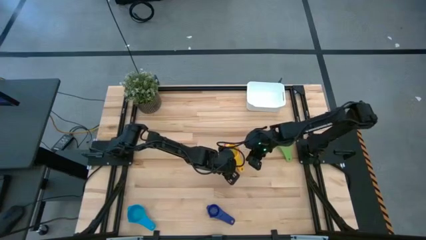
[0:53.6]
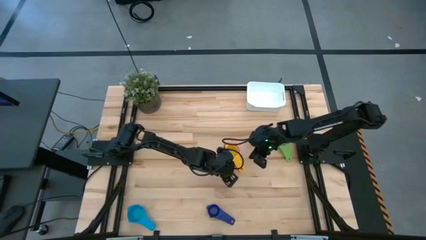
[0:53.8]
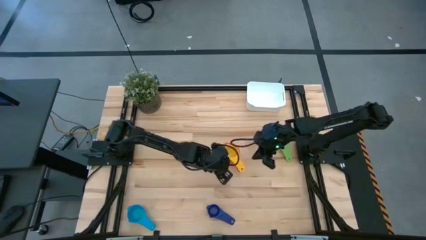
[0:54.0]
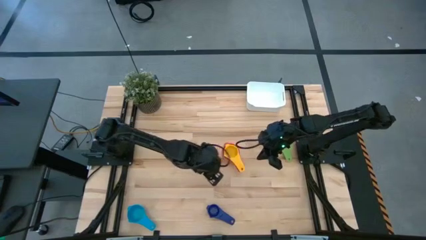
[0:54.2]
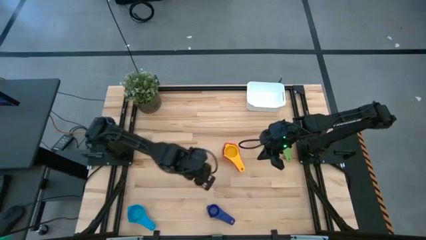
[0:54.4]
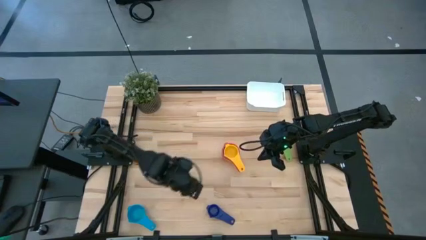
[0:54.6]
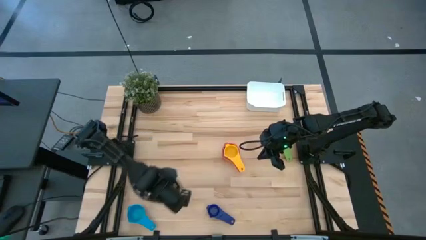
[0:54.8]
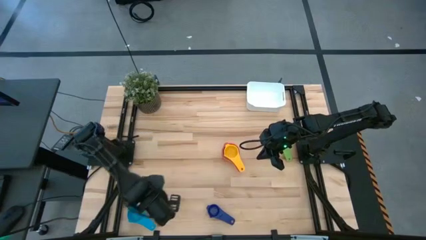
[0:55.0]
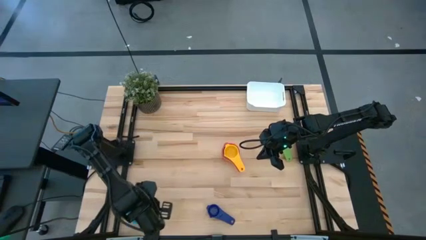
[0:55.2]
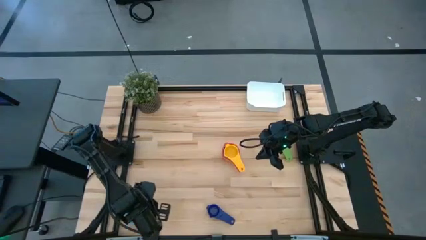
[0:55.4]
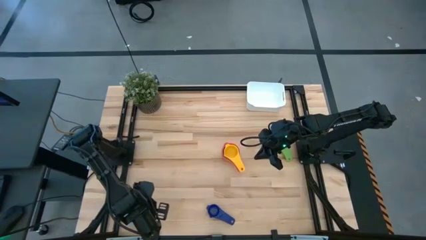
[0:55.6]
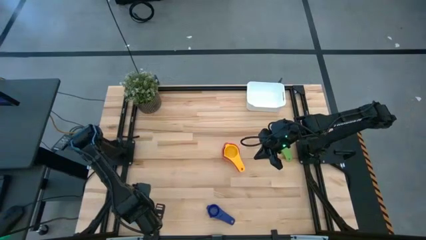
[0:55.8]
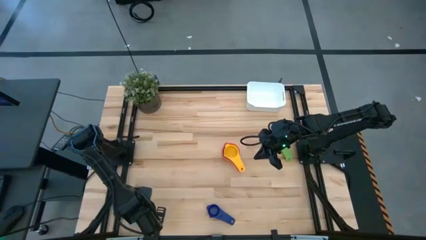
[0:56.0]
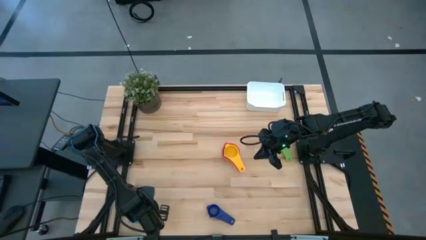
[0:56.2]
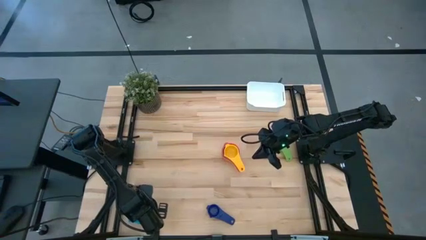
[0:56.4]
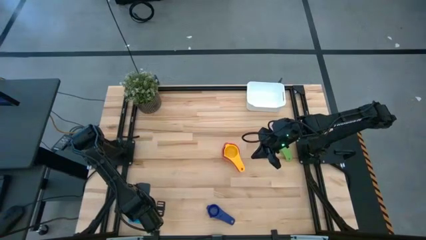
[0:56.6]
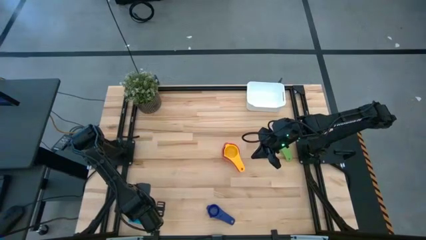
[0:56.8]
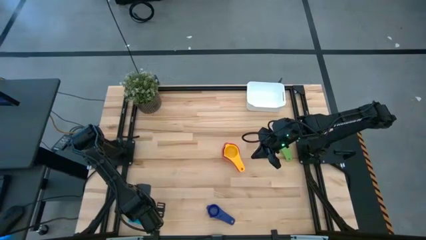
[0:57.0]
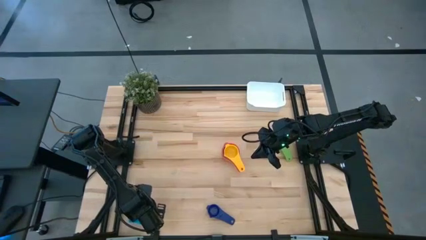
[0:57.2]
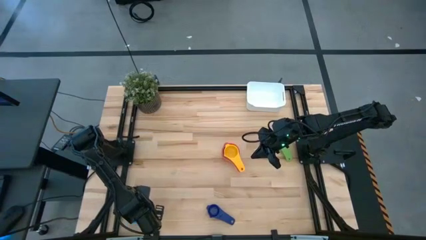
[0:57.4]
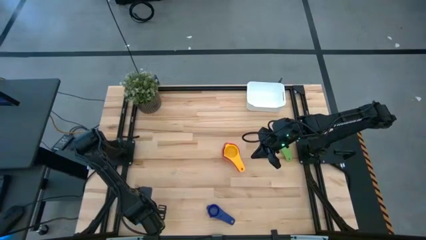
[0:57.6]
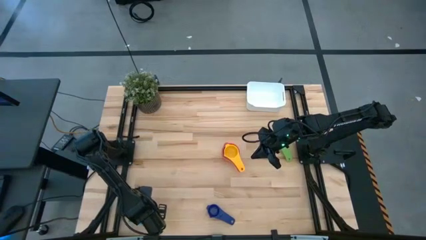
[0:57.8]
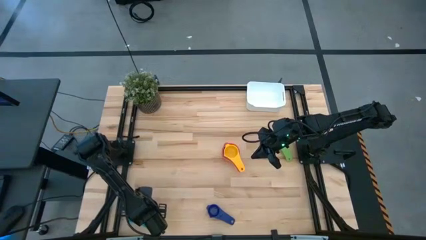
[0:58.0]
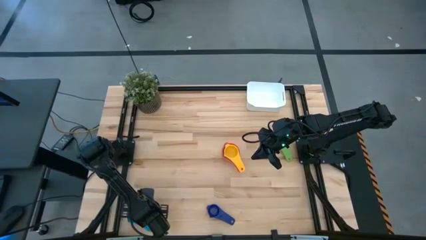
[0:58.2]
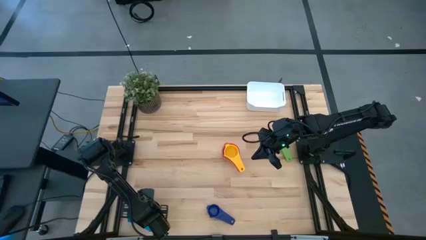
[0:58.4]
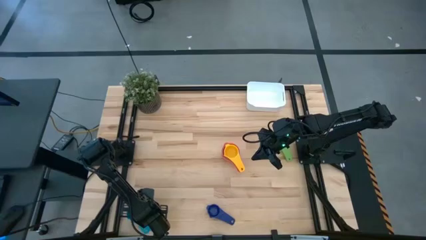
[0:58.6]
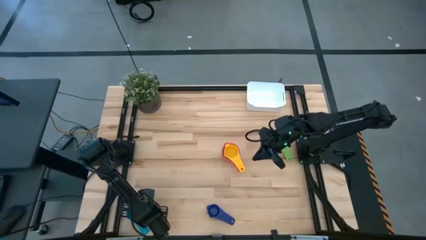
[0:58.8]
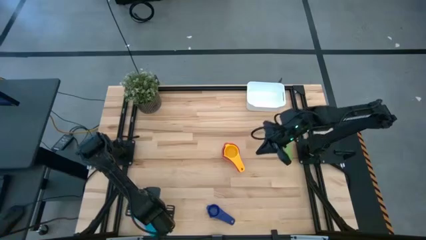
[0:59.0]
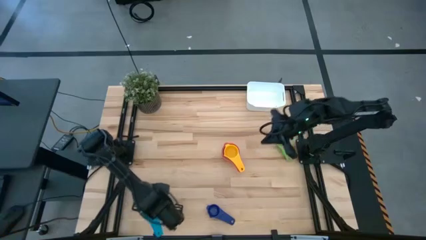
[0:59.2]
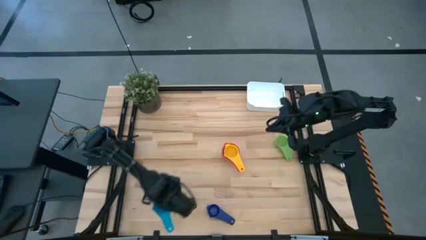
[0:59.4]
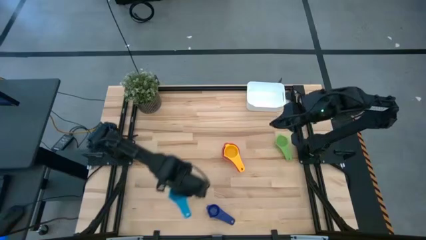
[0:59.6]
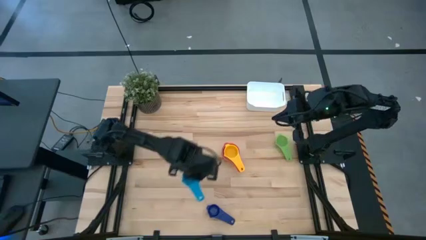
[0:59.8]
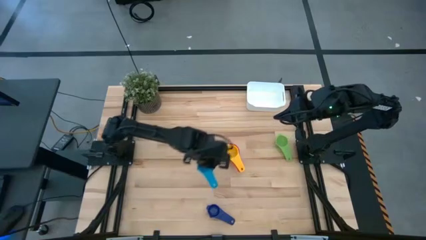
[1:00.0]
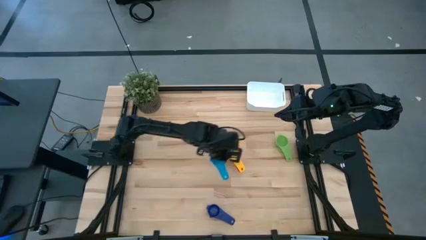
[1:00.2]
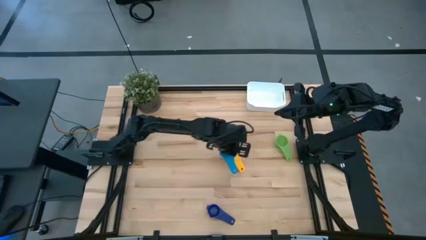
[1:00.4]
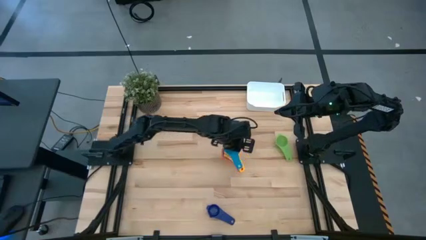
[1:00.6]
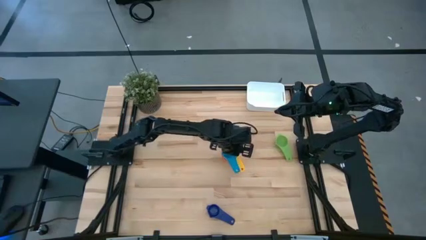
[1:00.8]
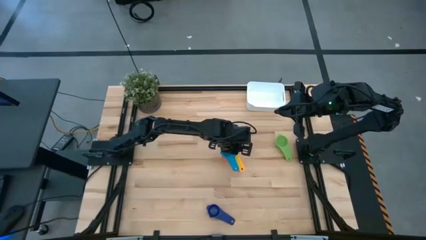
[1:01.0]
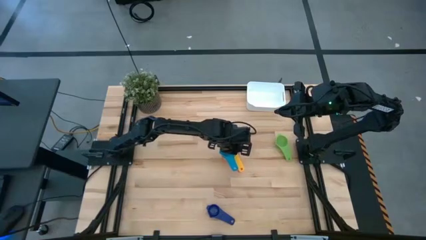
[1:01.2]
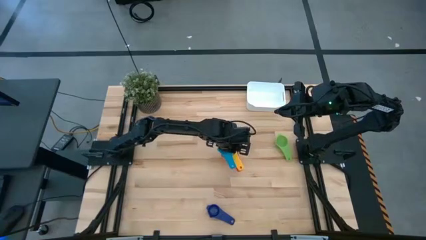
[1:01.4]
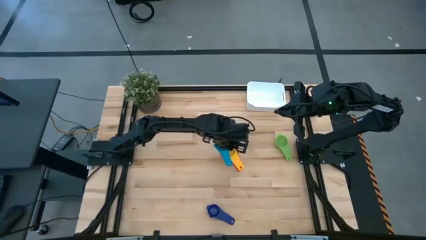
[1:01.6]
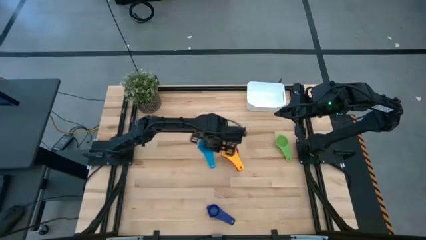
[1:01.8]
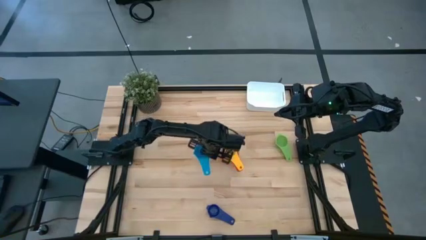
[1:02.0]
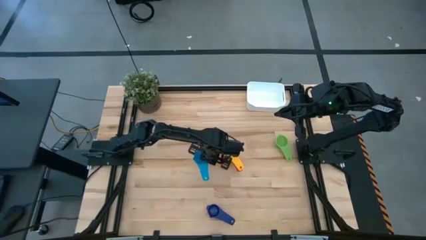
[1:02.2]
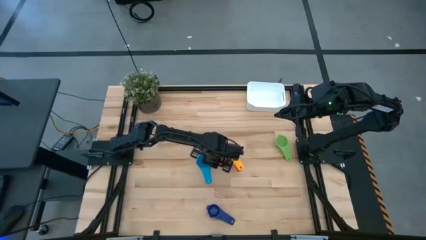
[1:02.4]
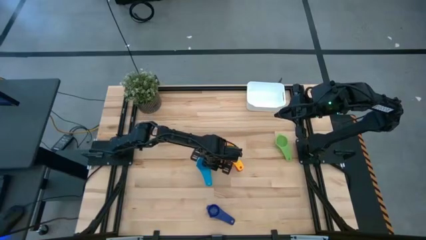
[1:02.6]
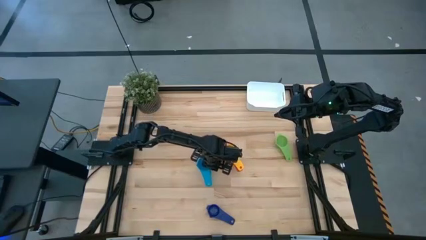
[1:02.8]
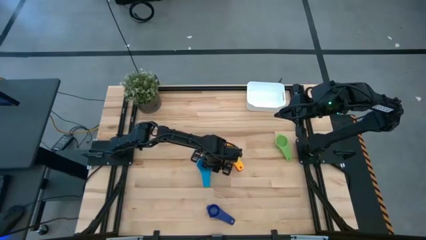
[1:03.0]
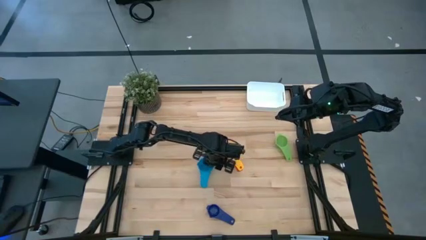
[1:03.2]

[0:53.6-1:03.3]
Task: Nest measuring cups in basket
Move the light blue measuring cup to the center of the table

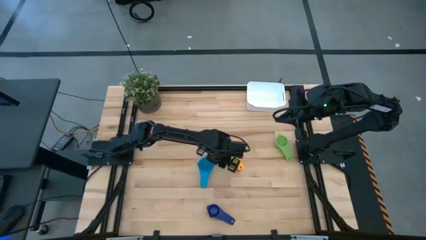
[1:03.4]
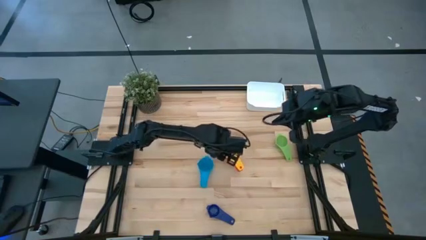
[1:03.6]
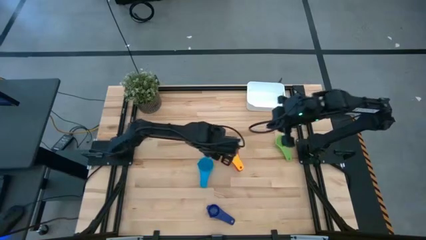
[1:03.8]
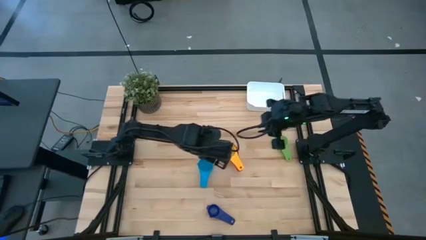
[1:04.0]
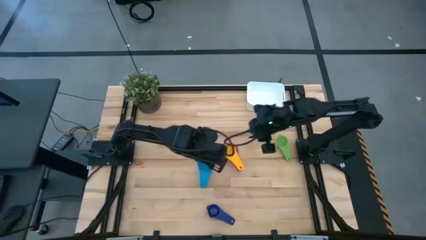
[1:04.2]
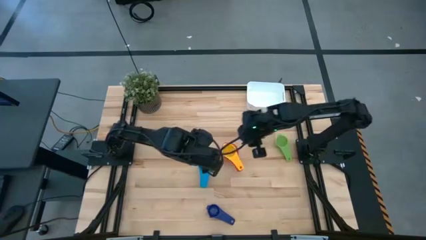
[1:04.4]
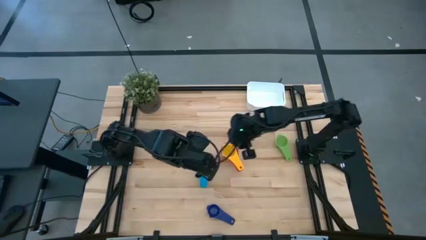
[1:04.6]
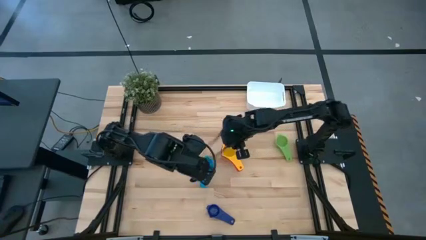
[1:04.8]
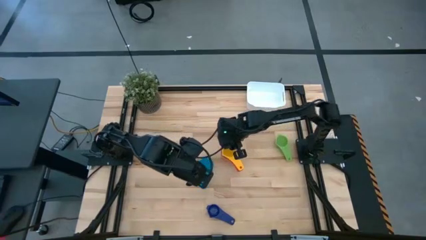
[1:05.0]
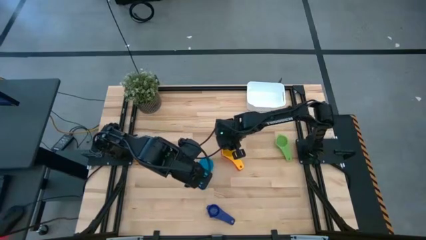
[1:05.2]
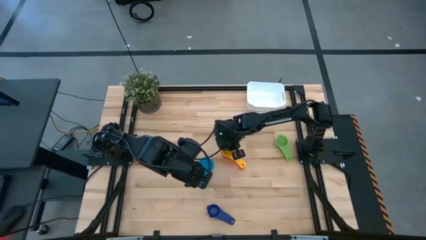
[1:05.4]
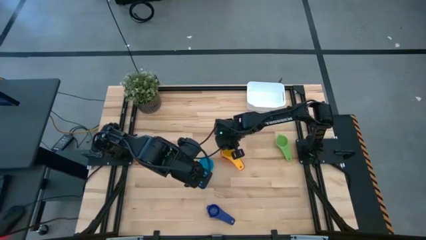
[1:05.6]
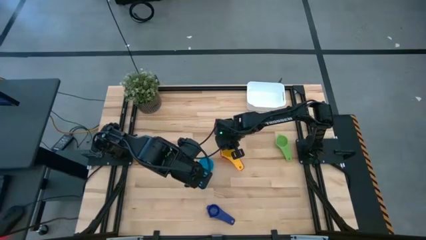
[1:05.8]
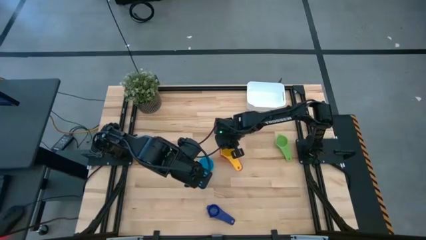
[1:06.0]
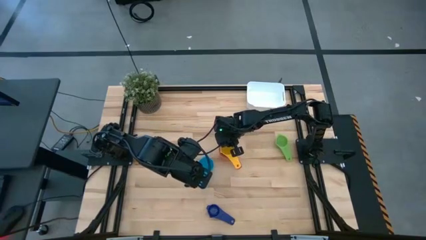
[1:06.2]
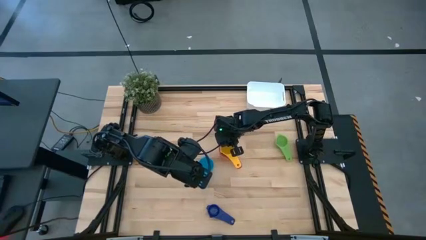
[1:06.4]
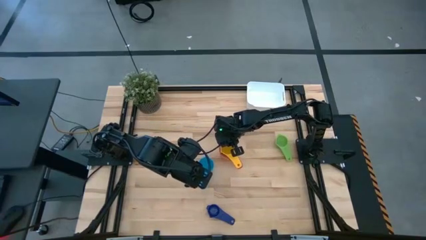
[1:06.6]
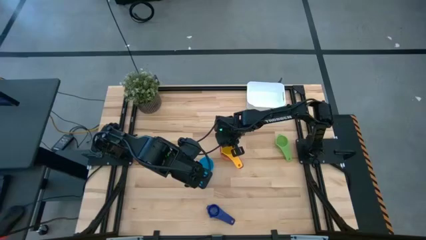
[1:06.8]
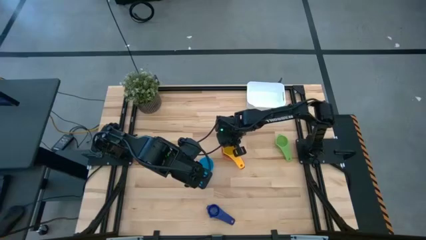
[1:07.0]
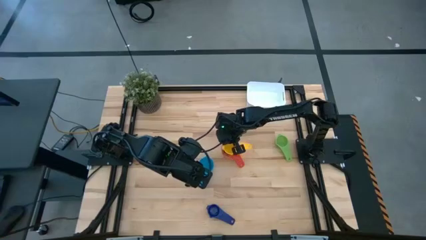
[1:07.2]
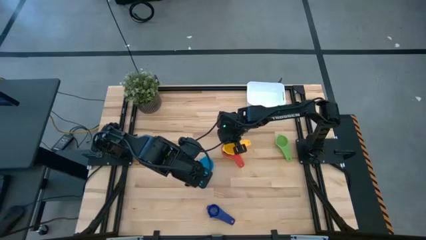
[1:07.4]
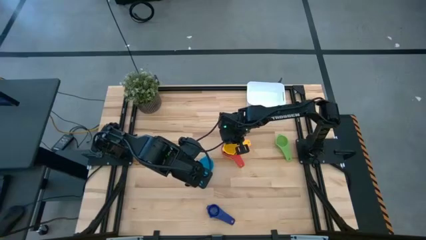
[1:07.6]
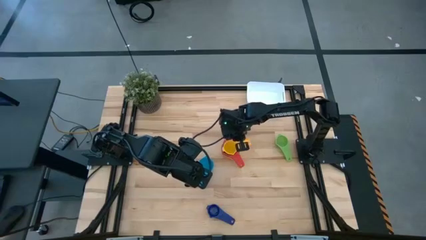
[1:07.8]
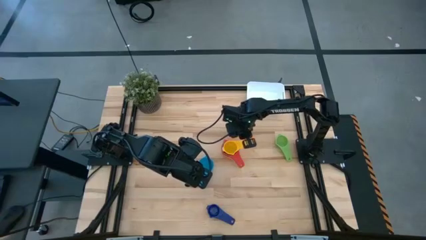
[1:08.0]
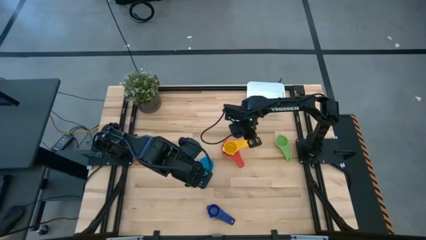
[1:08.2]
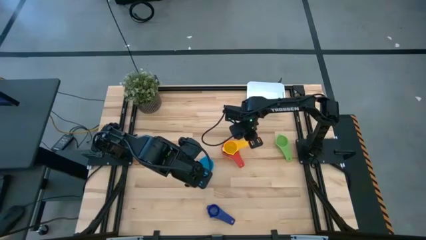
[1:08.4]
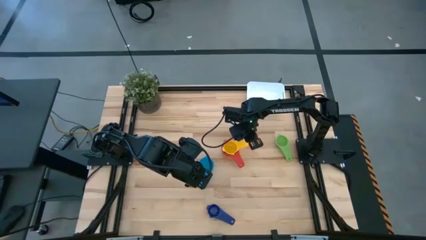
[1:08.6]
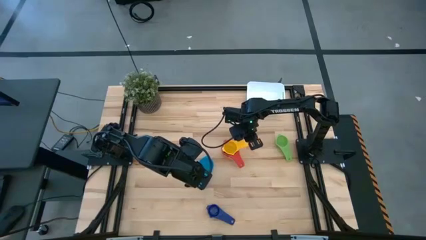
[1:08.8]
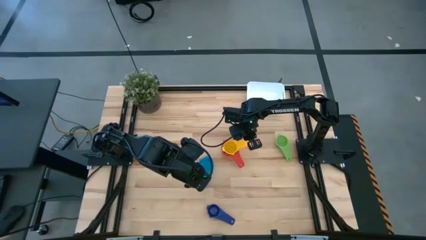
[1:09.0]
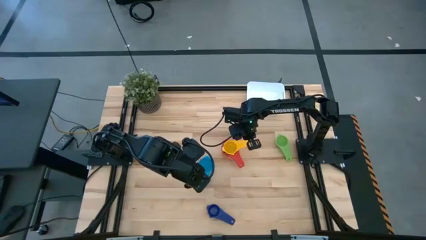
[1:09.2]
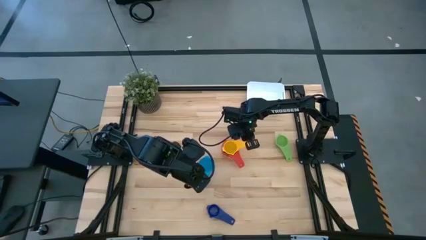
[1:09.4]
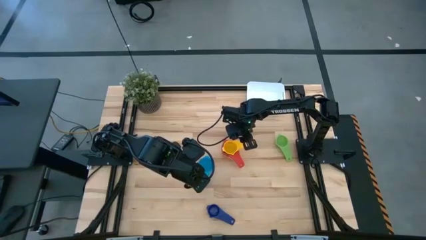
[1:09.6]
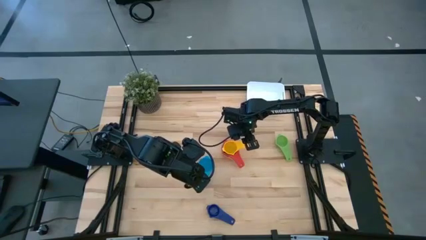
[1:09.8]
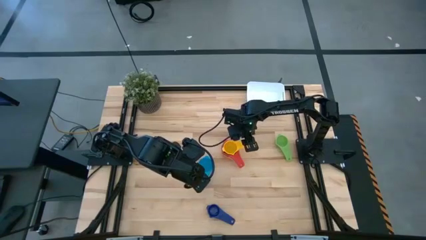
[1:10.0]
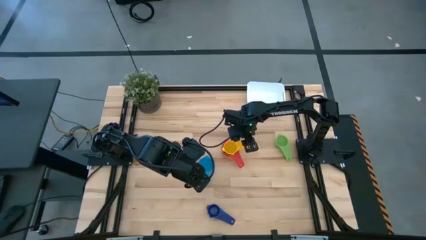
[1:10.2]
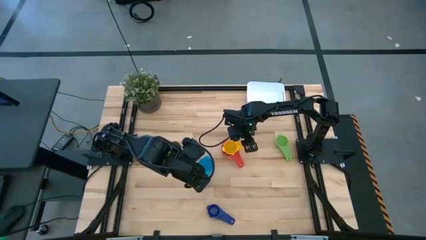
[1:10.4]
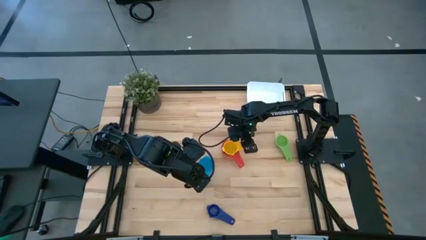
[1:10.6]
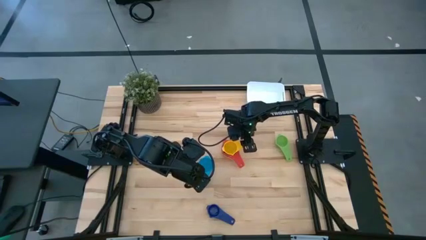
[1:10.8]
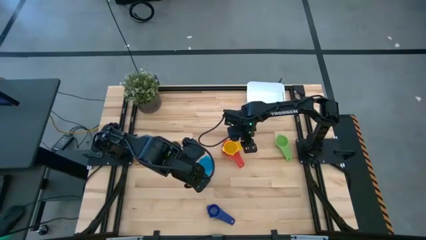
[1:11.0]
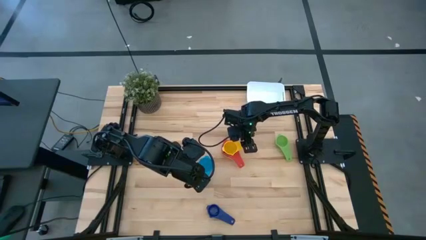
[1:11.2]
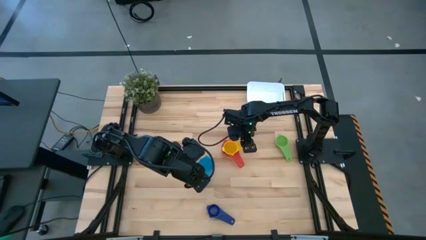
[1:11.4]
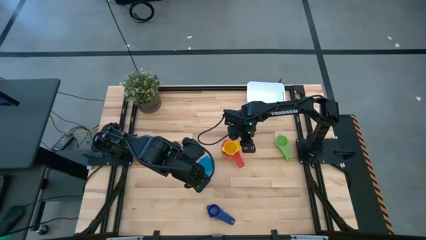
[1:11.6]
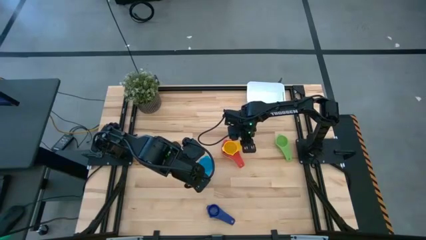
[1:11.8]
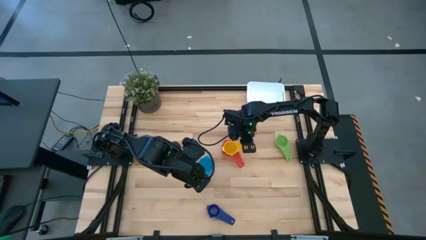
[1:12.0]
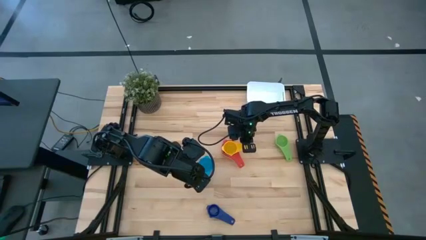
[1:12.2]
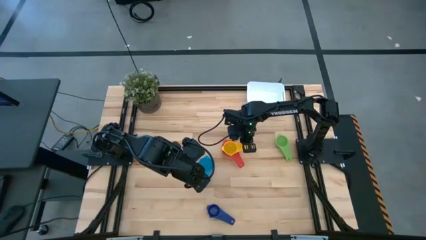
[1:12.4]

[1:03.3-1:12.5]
Remove the yellow measuring cup from the red measuring cup
